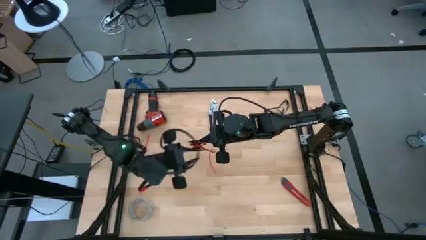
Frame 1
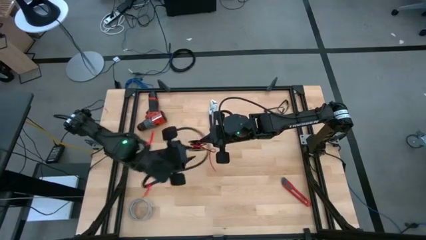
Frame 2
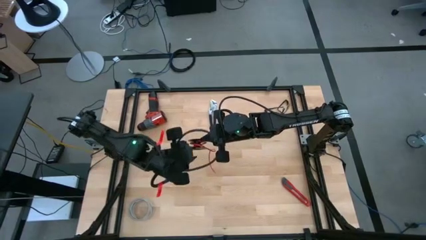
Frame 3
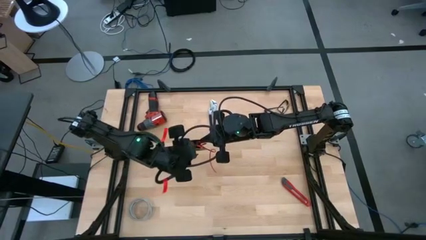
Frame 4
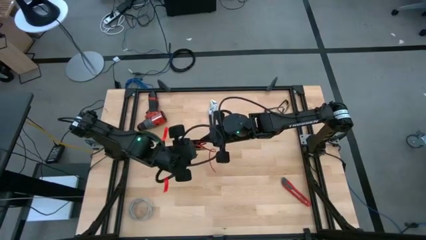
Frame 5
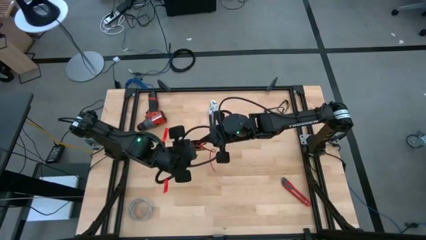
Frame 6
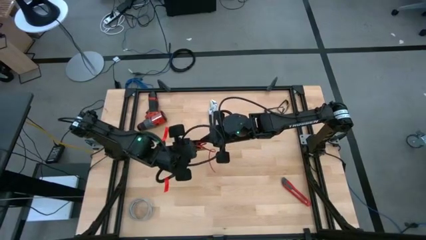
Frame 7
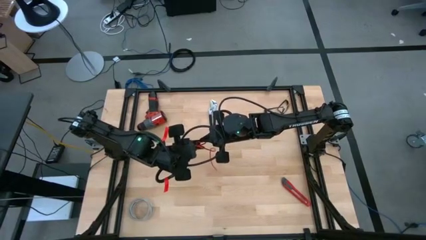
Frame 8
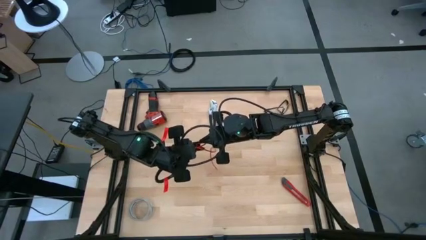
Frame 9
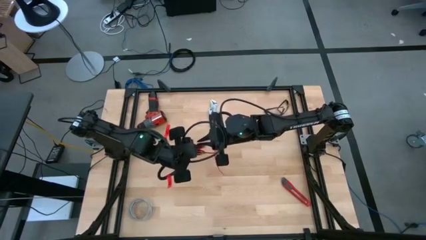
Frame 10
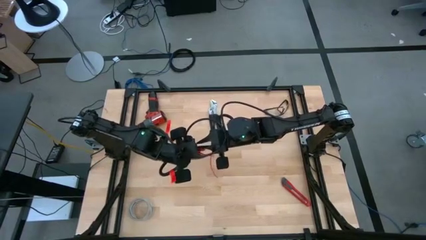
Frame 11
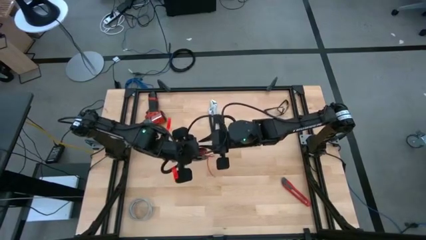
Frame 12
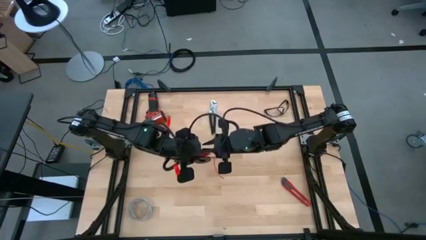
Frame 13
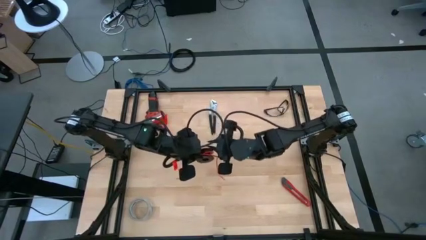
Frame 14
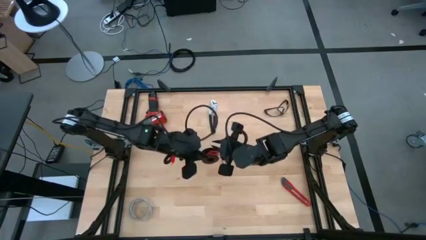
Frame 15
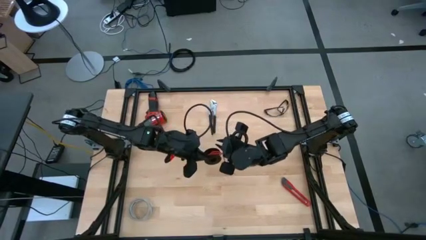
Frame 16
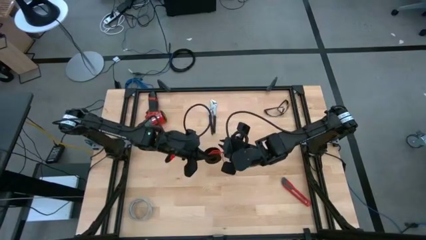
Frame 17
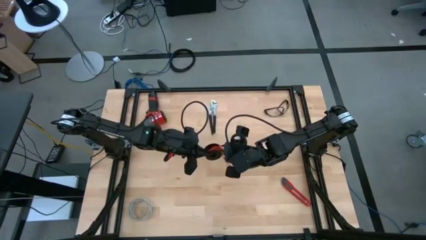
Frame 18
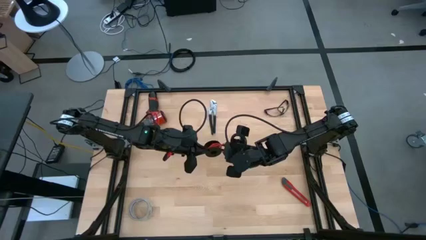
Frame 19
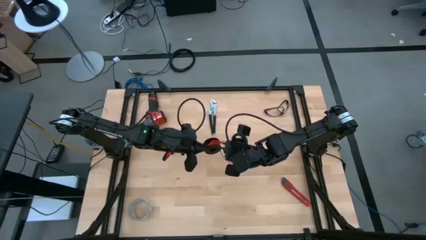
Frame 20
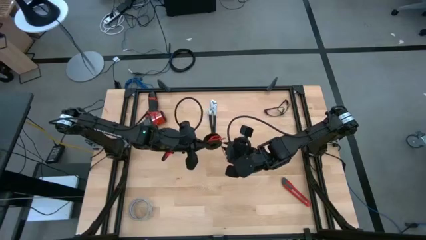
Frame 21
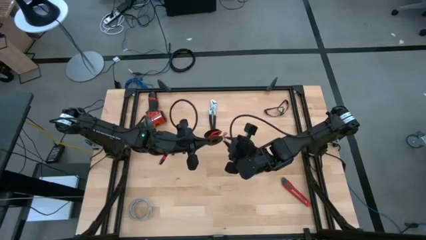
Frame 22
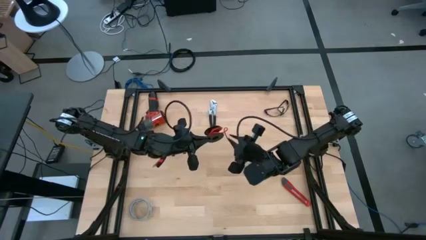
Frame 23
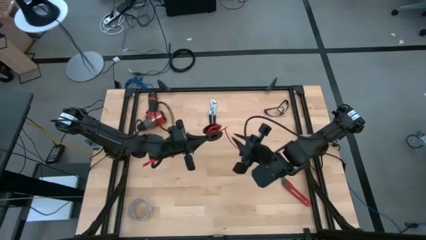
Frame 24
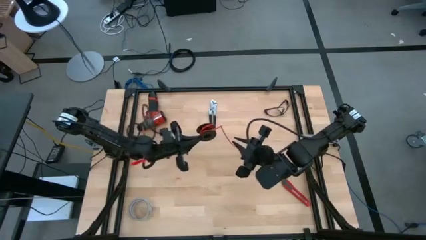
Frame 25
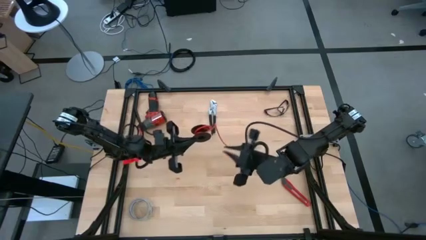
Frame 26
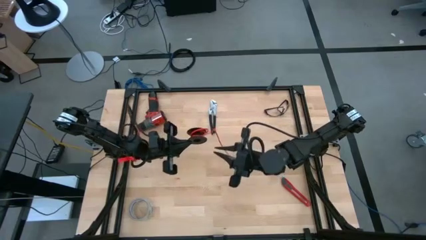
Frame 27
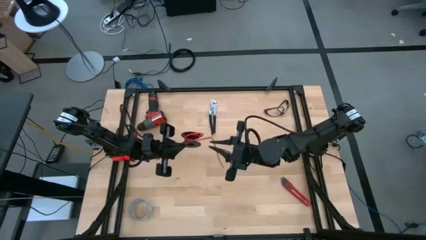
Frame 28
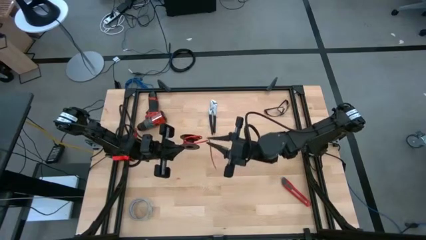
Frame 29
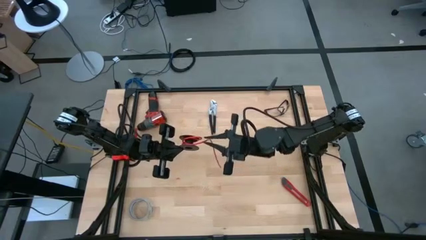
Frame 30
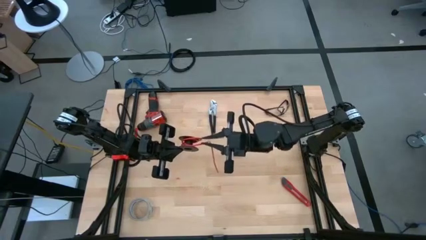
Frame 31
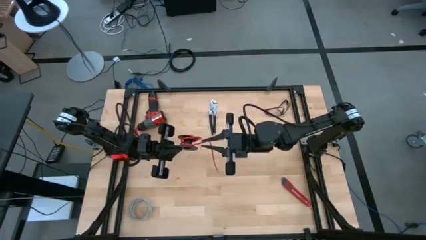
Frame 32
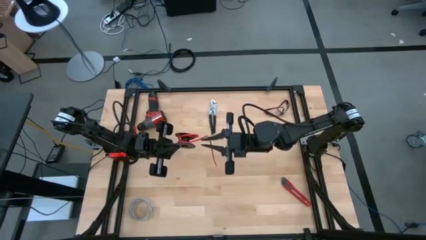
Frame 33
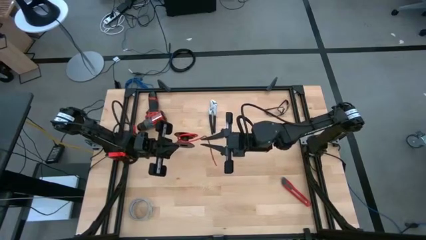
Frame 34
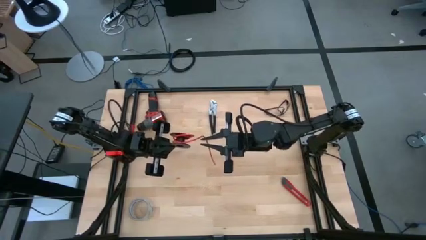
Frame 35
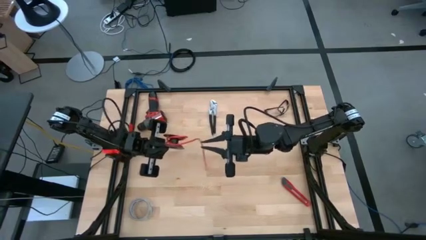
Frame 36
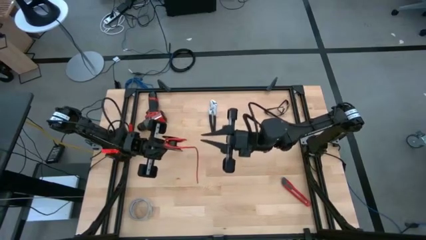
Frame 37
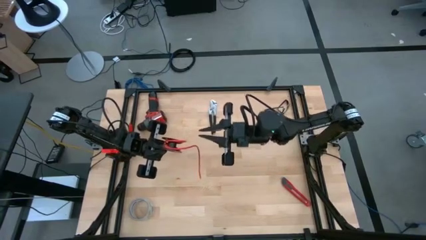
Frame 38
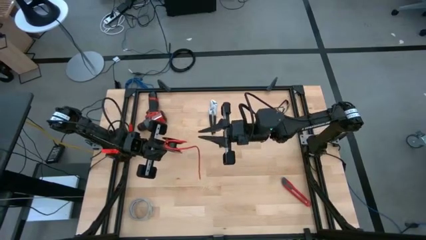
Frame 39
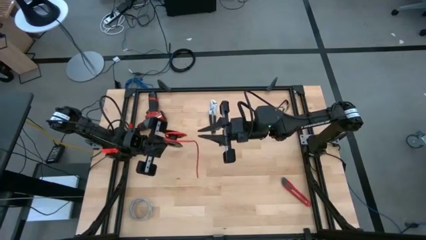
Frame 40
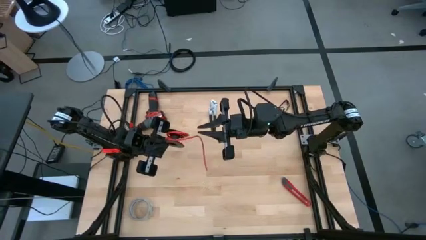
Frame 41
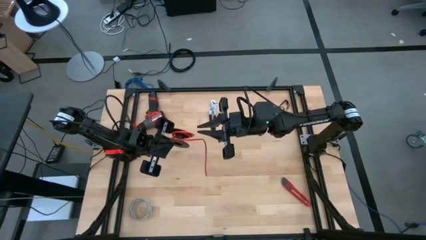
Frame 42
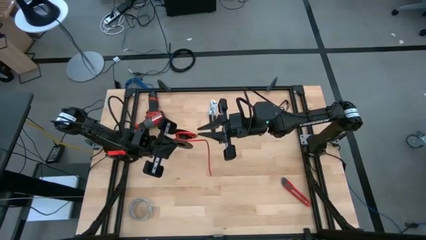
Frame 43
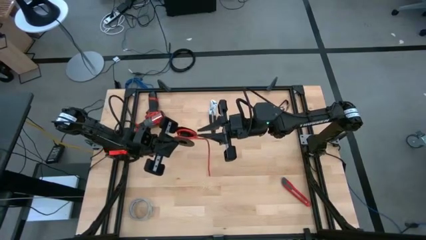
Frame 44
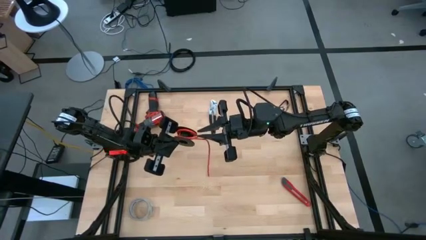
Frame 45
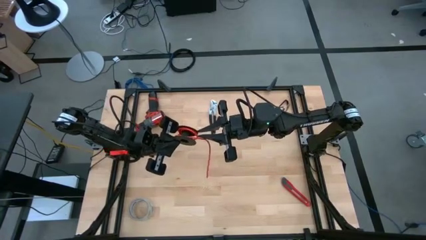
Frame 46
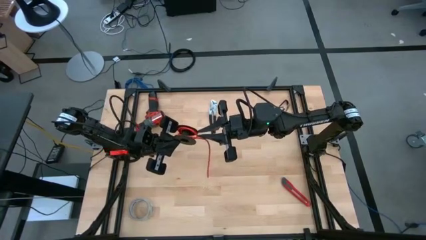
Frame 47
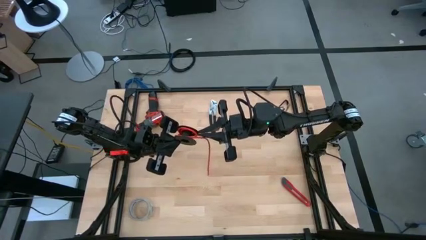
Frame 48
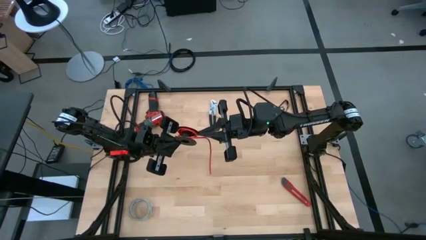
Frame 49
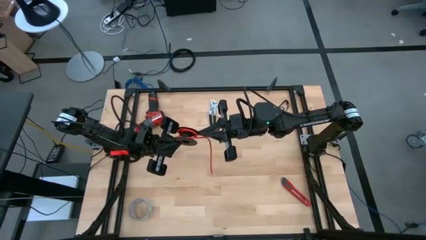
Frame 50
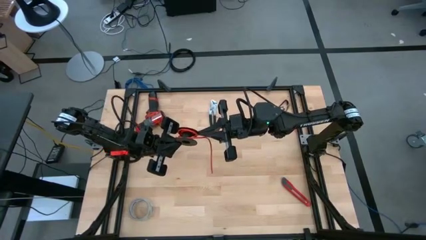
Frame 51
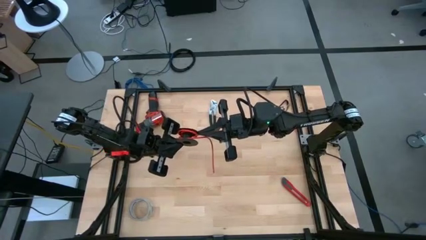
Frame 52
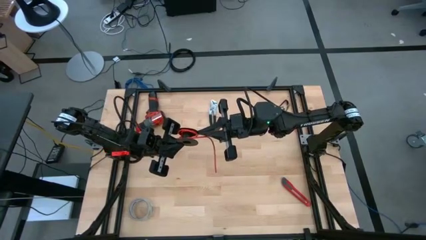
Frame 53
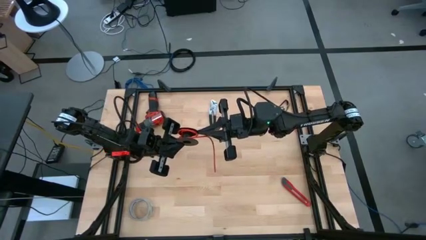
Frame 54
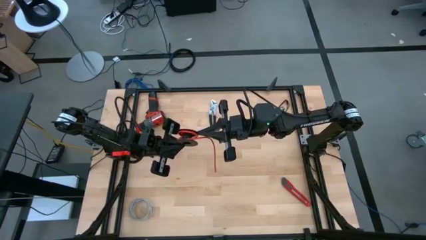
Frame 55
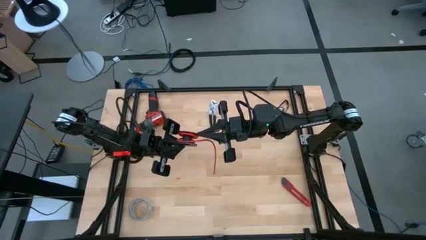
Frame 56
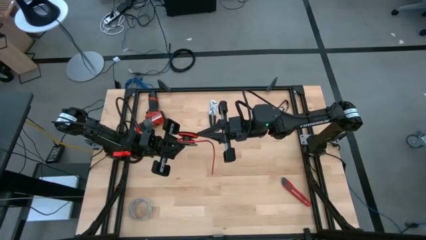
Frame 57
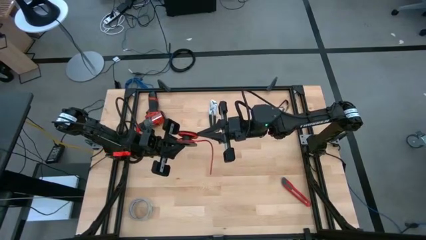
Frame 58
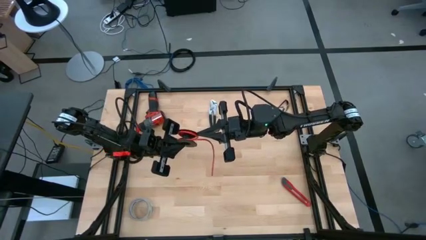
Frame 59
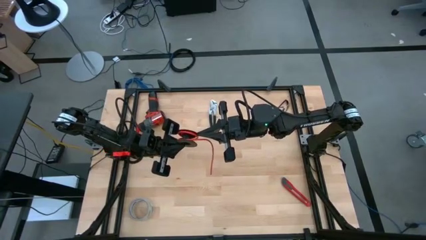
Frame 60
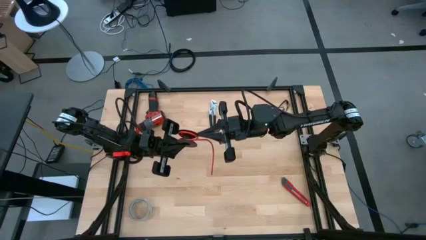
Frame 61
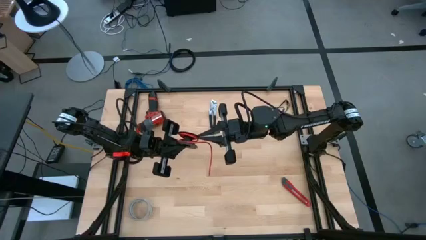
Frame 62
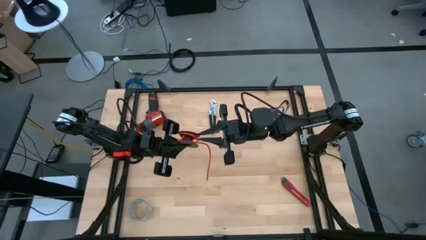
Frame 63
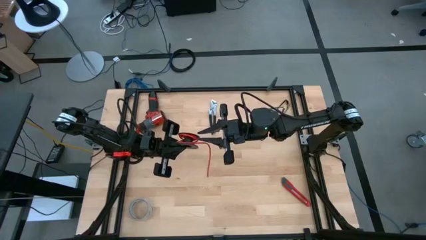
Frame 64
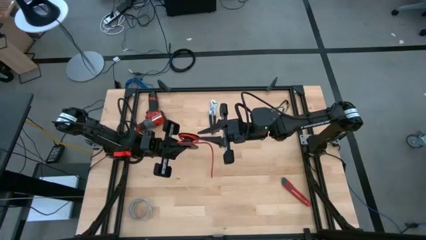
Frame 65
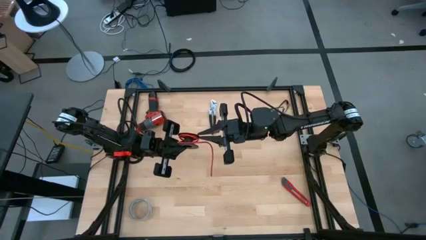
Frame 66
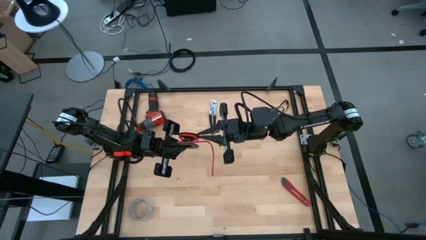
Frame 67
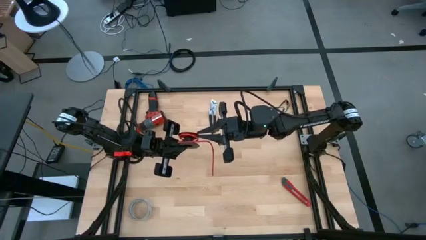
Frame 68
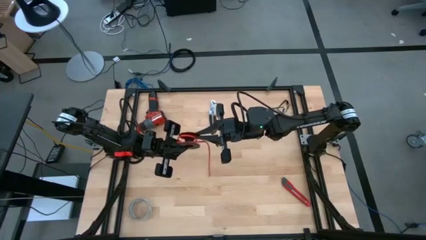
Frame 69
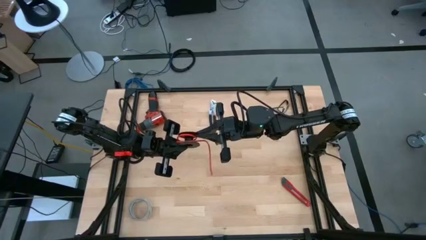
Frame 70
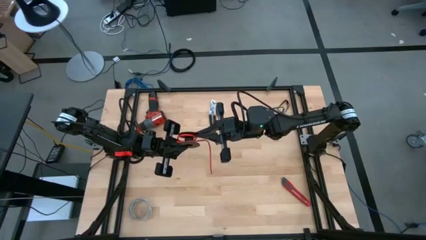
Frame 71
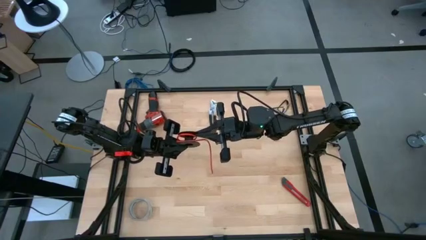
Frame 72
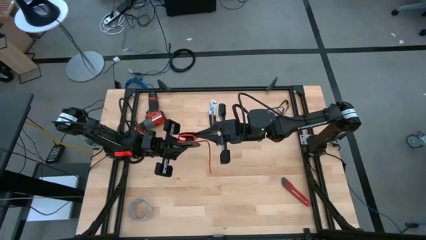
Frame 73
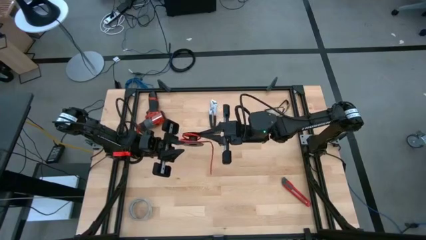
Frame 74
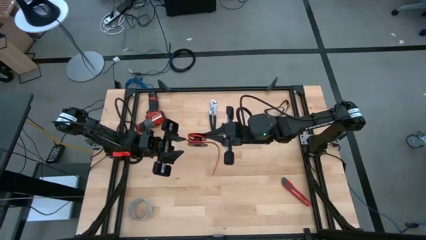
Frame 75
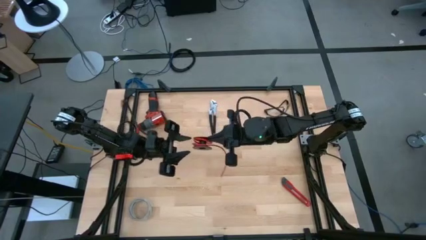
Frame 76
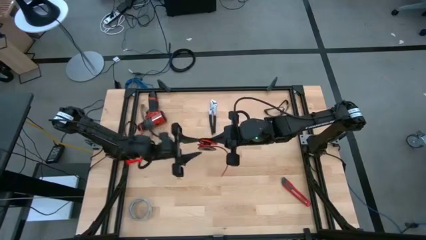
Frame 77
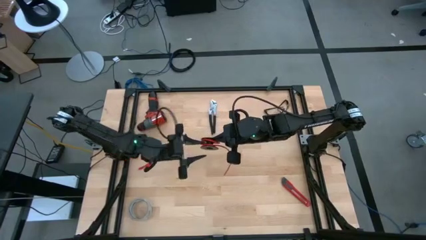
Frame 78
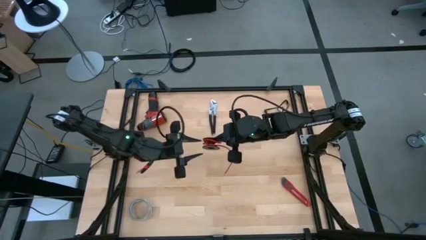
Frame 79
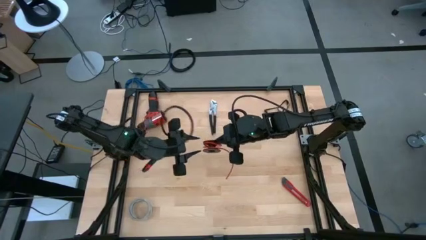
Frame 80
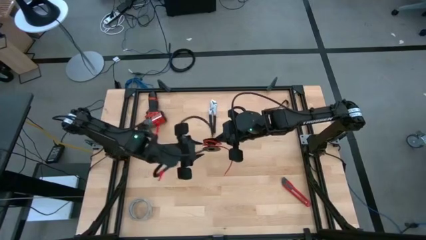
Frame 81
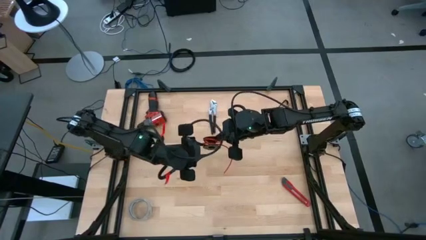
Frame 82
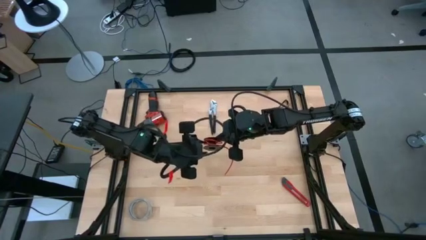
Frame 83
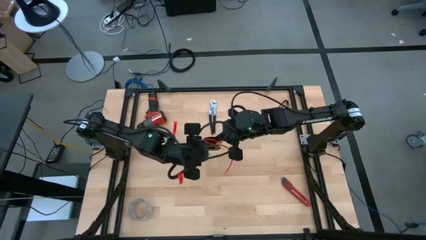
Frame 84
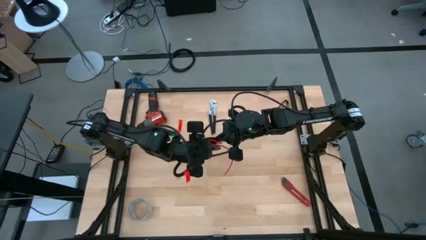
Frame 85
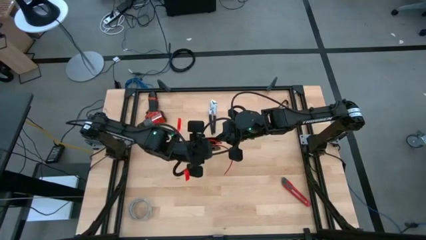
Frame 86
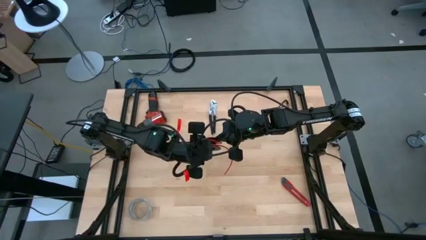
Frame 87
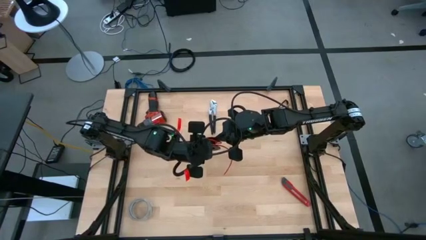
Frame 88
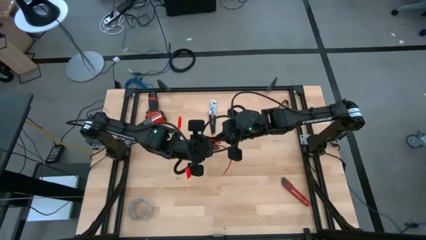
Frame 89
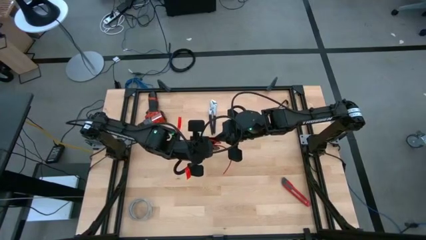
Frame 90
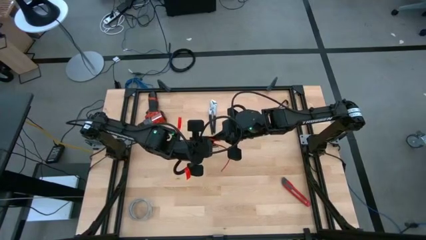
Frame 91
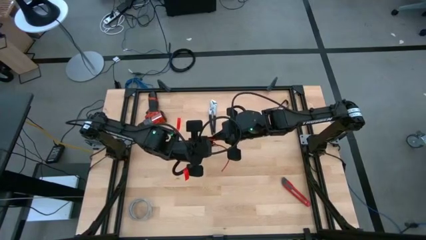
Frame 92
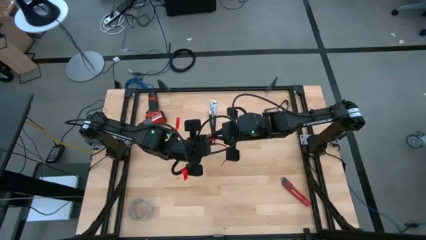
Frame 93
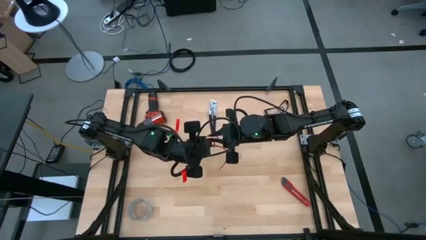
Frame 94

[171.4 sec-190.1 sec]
Task: Coil cords
Coil the red wire onto the black spool
